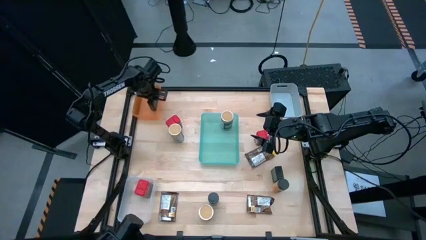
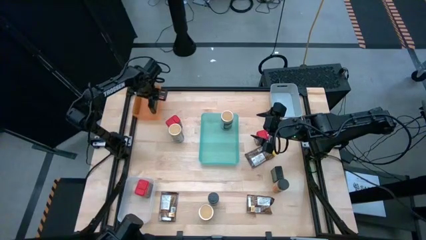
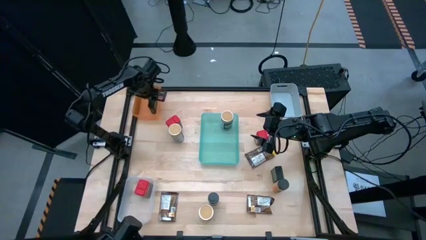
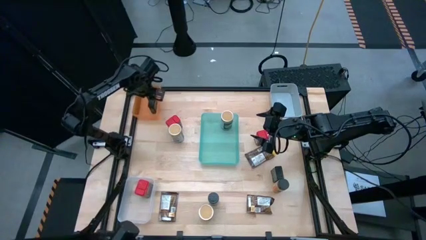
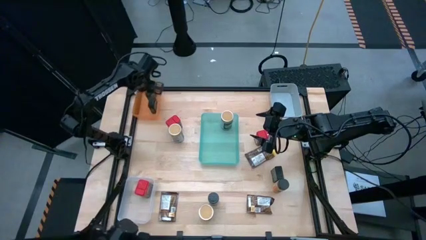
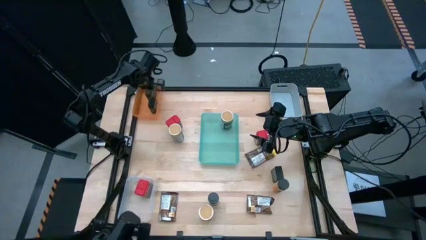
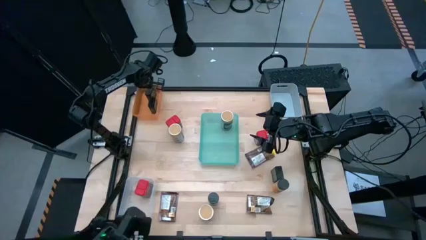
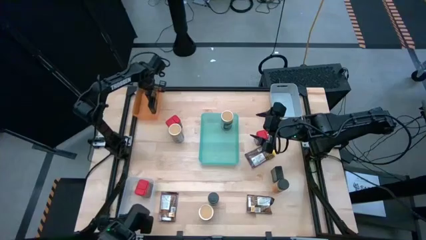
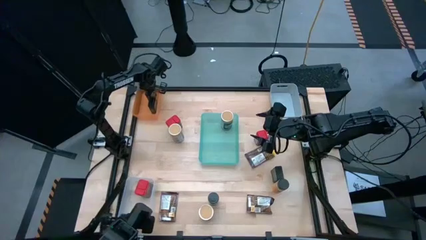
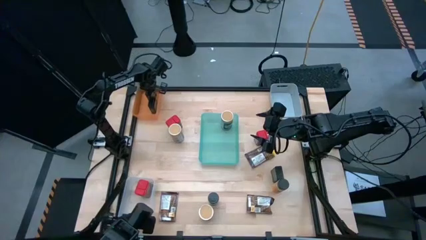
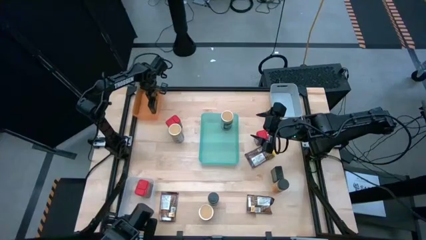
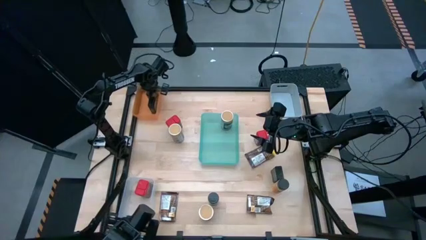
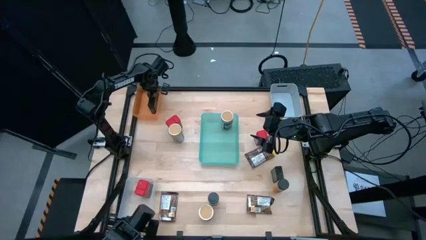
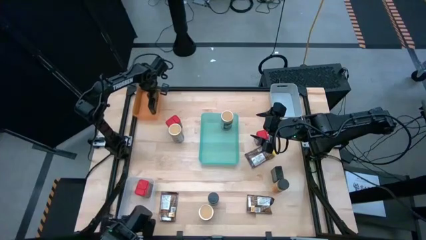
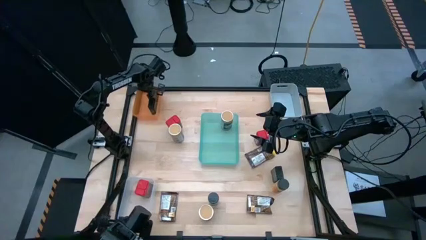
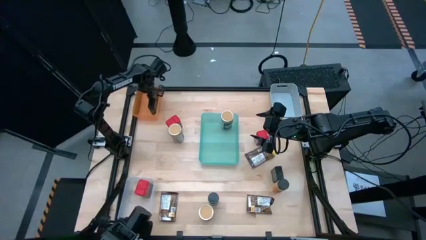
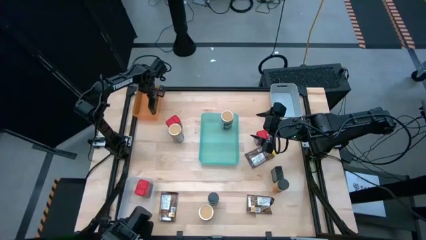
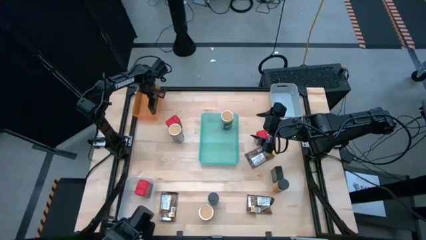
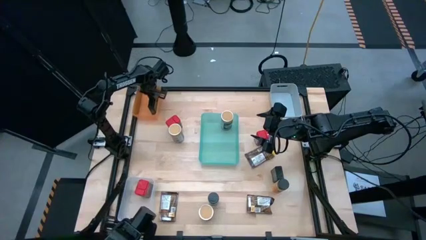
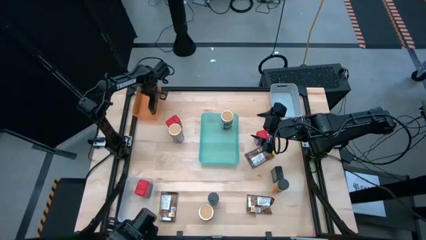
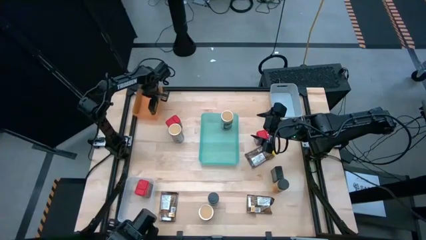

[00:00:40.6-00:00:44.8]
Task: Sort spices by type
Adjust the black seasoning can in the orange bin

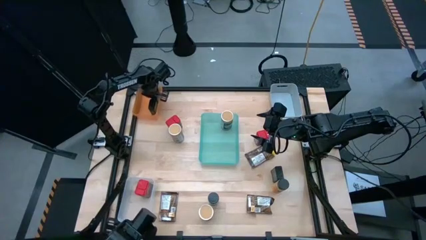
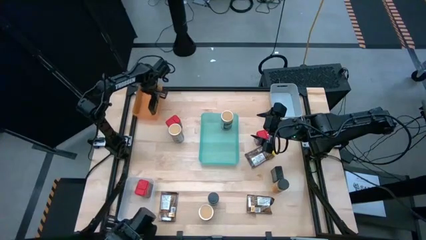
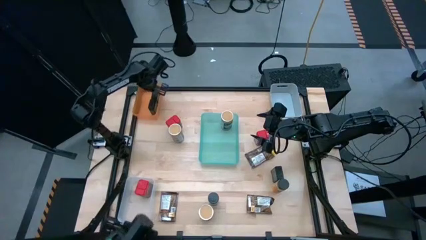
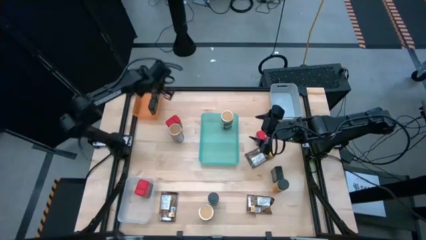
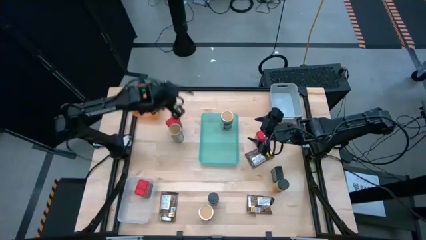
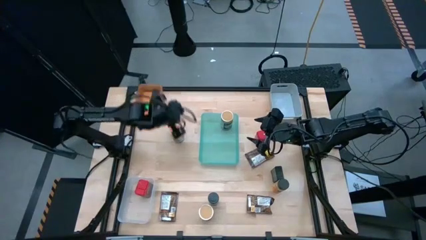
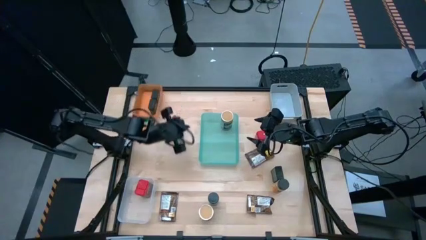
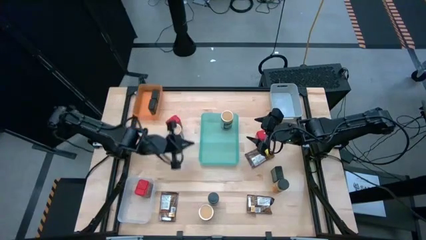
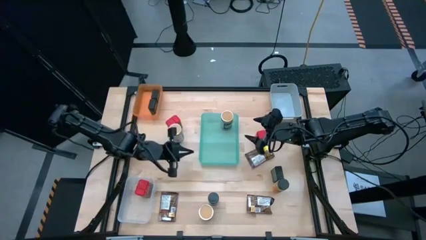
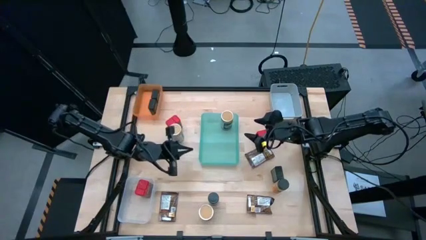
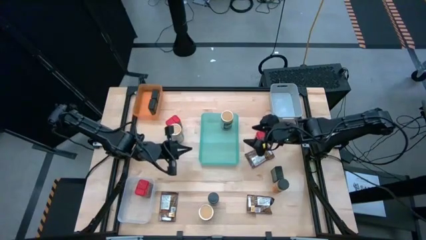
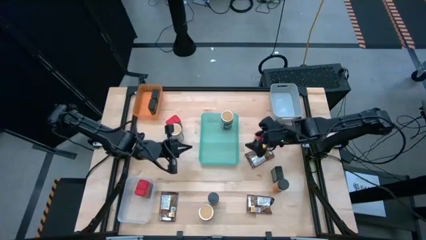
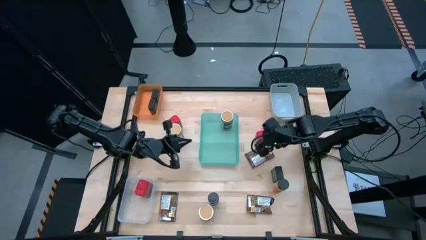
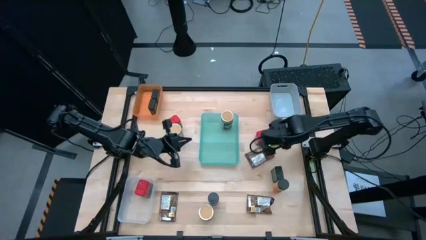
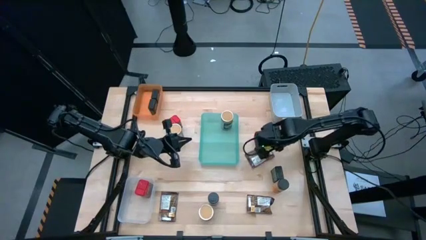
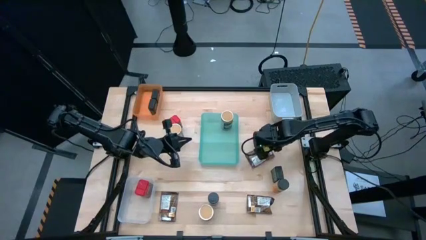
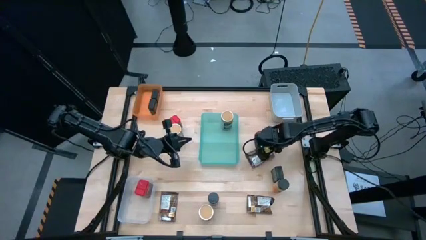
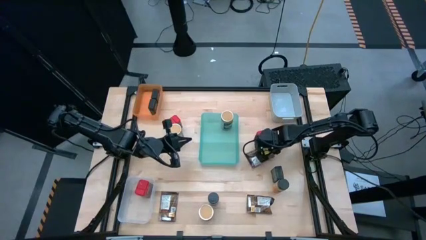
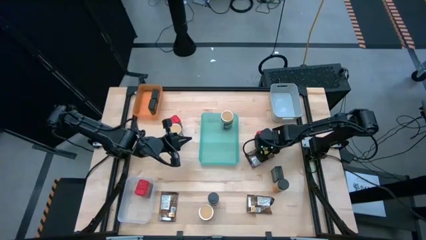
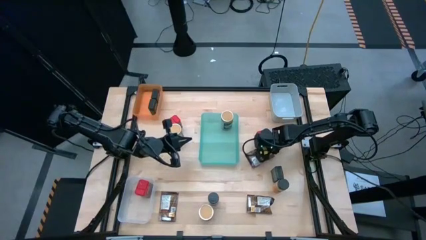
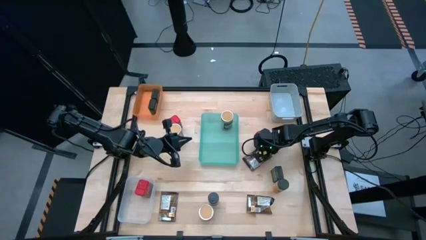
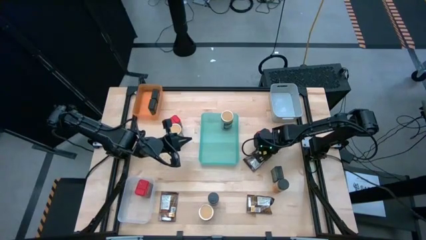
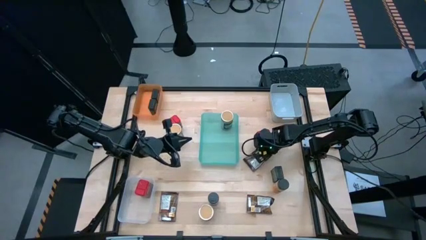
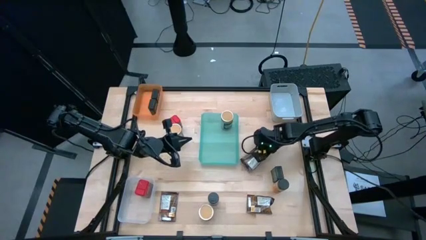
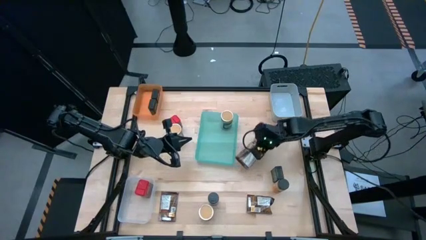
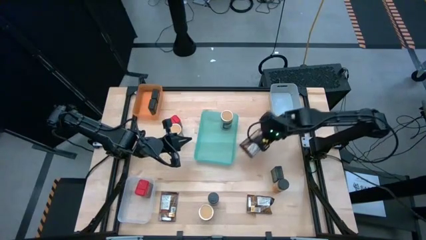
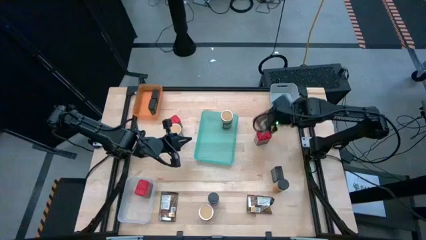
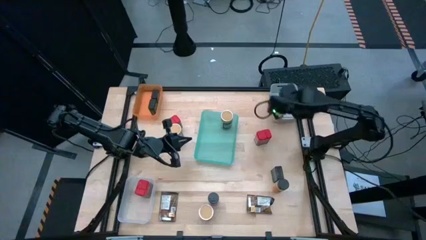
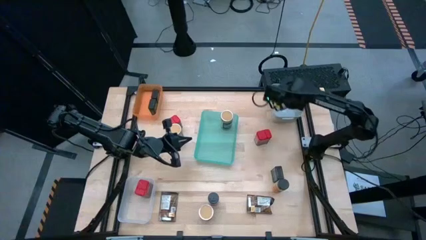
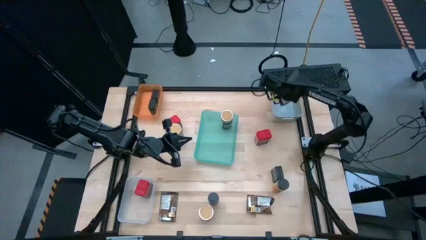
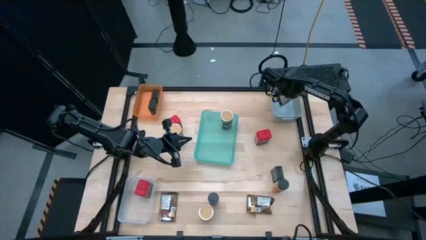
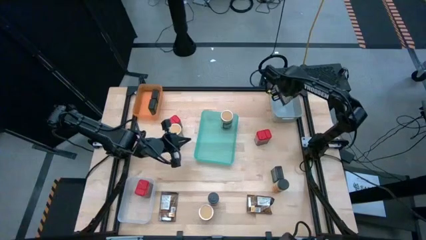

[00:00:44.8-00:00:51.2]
Put the top orange seasoning pack into the gray bin

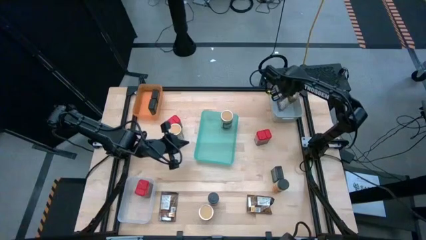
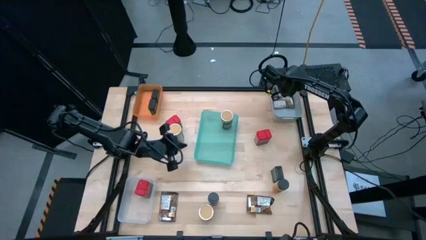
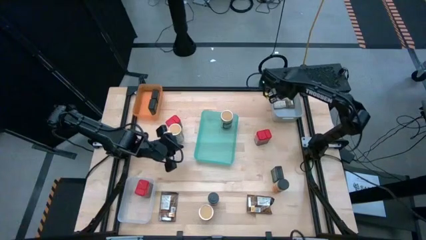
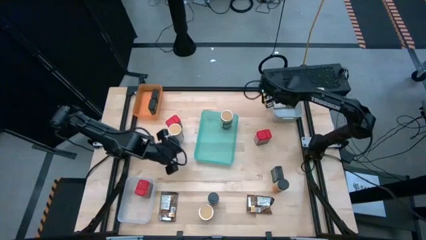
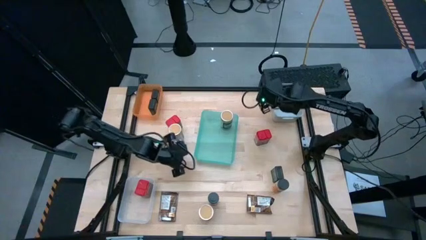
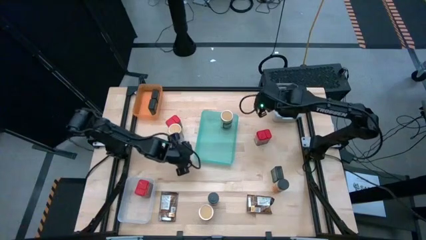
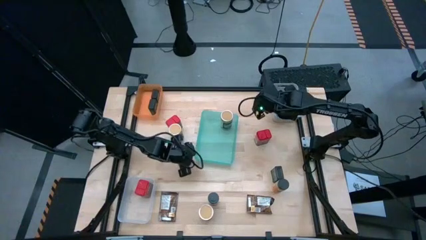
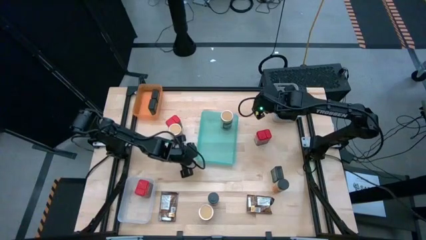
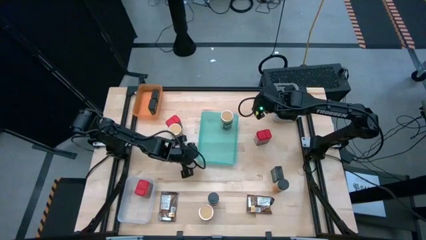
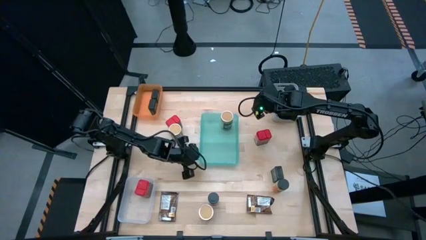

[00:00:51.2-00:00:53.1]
Adjust the green bin

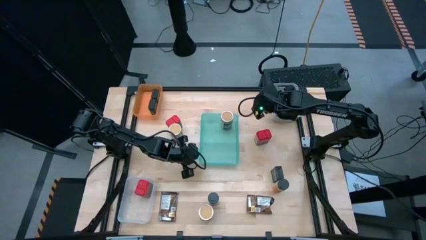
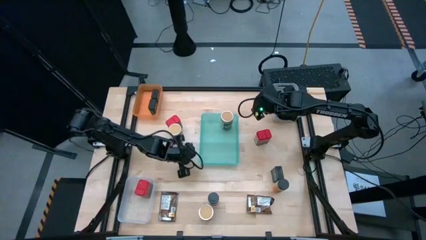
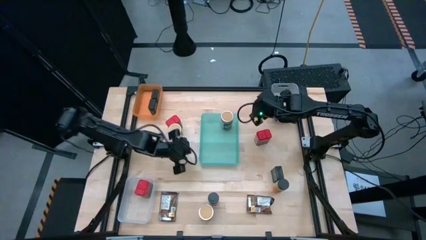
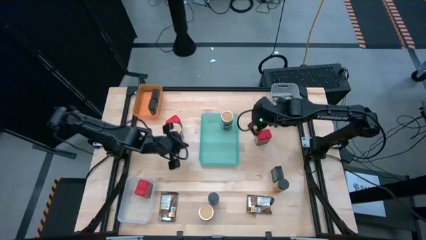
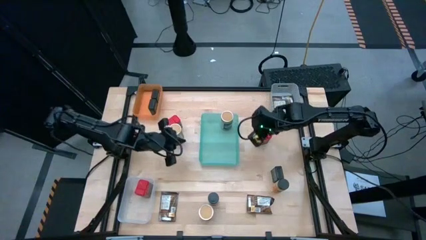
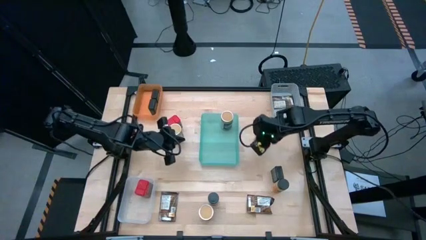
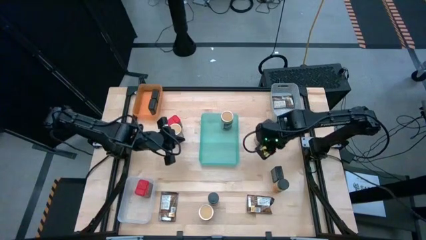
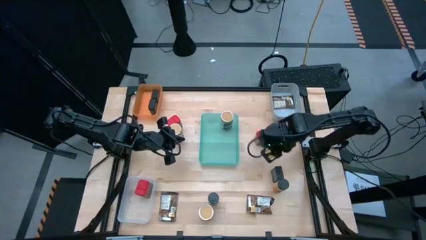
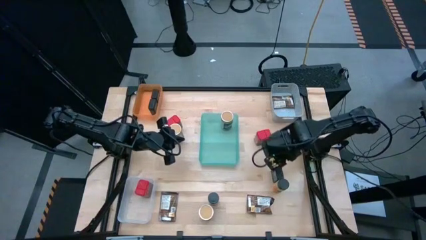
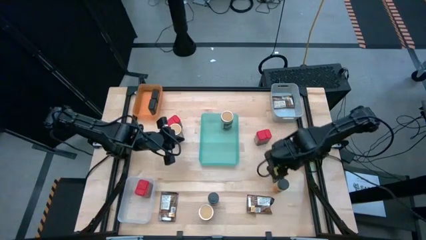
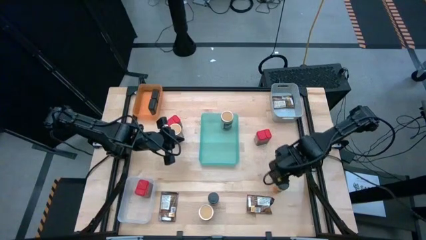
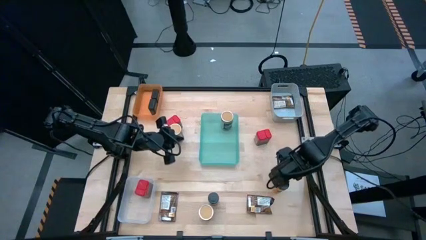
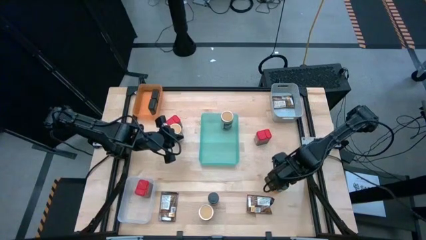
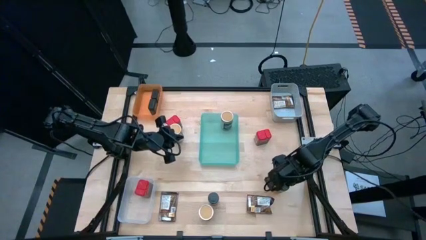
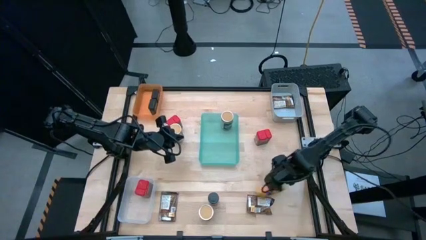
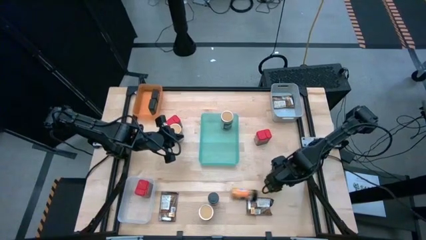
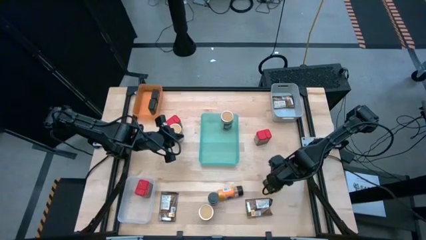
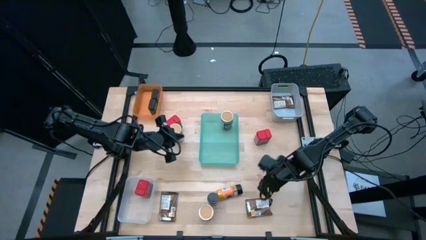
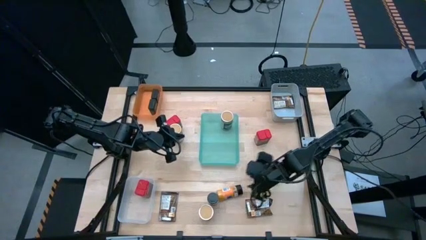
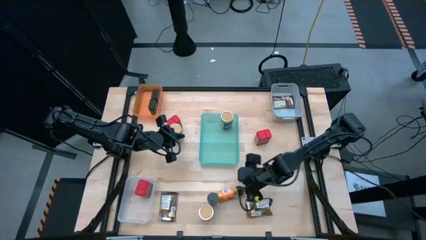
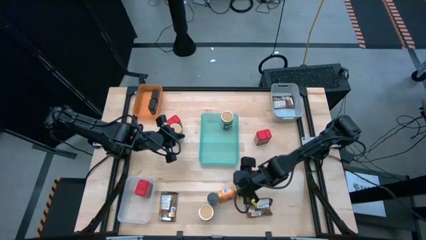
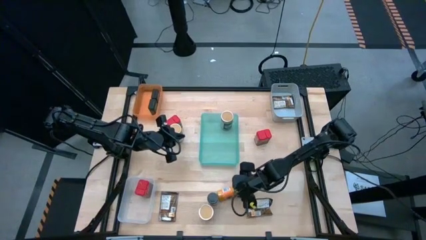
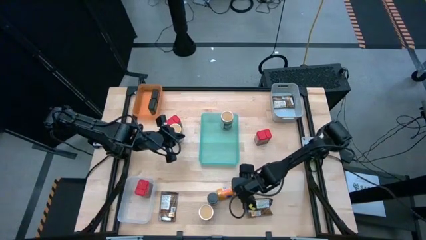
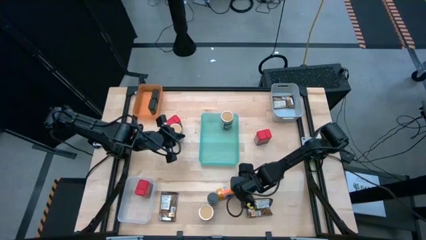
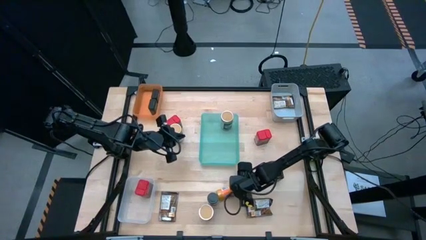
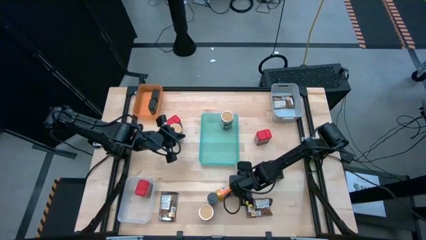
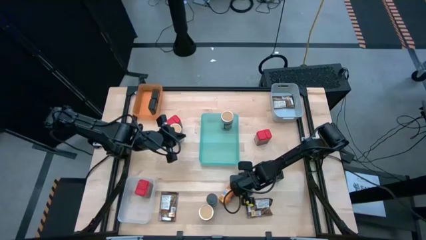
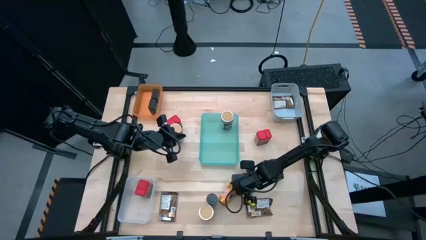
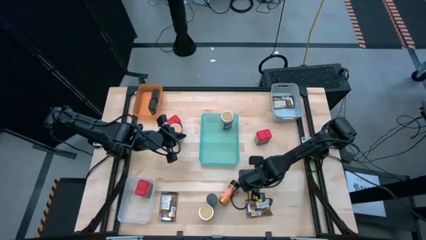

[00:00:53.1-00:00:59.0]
Put the right black seasoning bottle into the orange bin
